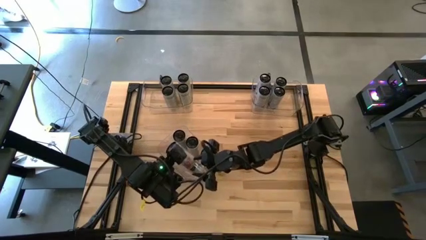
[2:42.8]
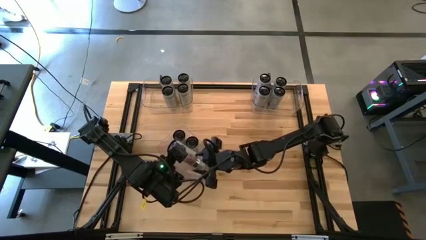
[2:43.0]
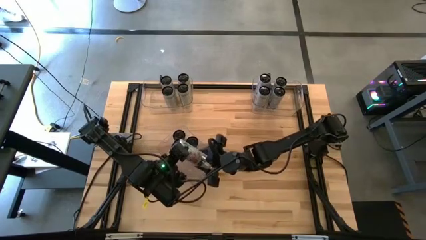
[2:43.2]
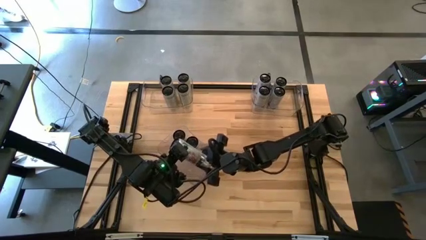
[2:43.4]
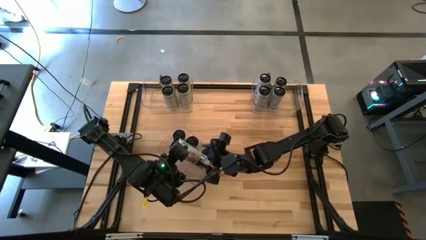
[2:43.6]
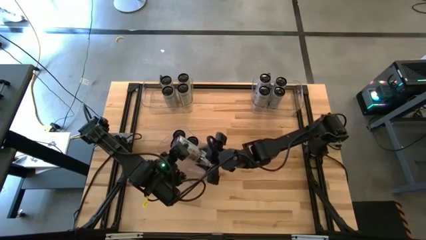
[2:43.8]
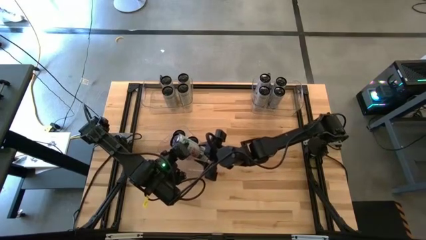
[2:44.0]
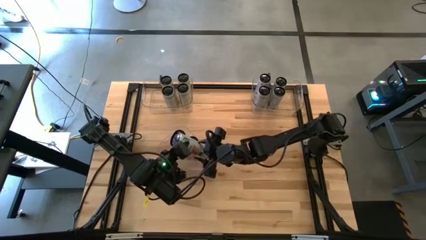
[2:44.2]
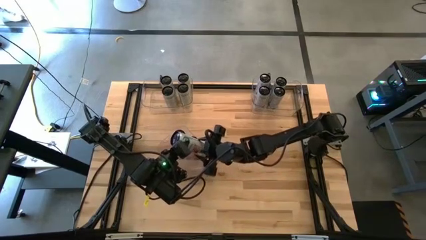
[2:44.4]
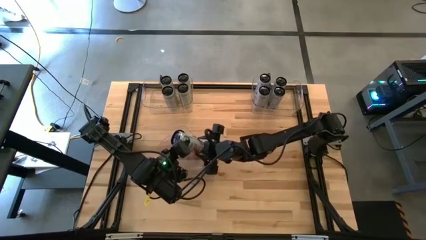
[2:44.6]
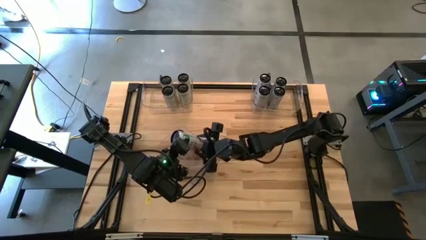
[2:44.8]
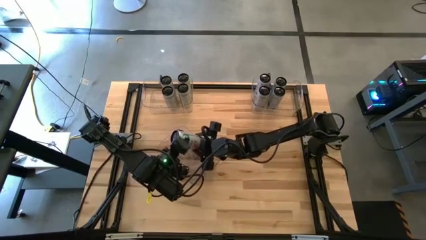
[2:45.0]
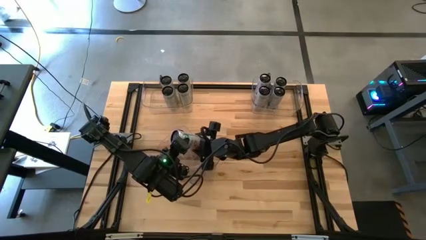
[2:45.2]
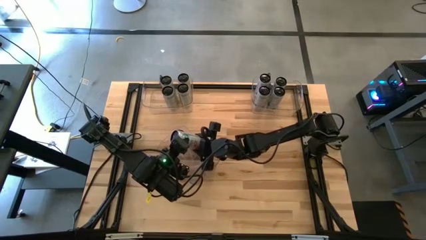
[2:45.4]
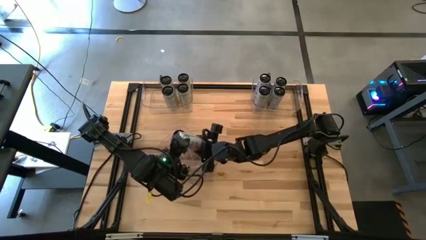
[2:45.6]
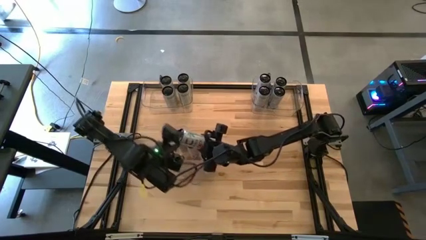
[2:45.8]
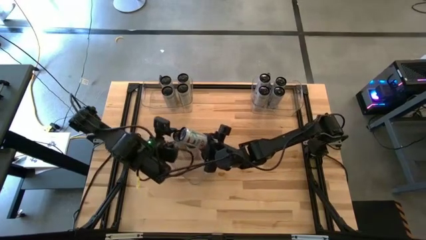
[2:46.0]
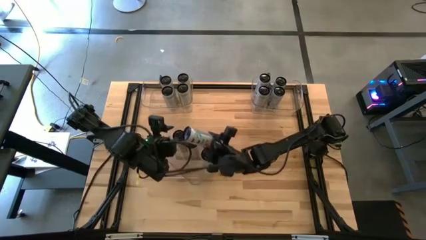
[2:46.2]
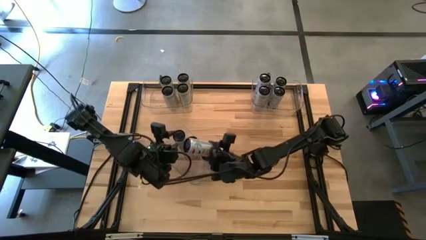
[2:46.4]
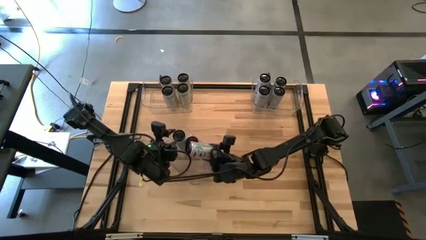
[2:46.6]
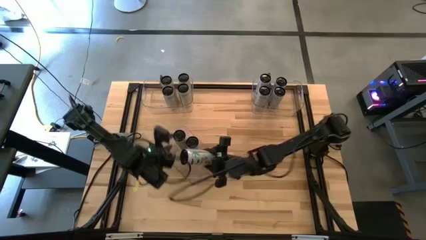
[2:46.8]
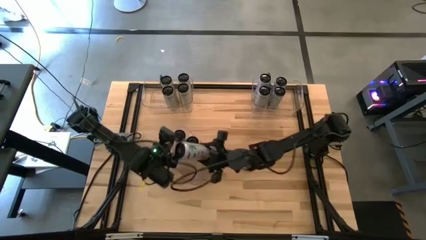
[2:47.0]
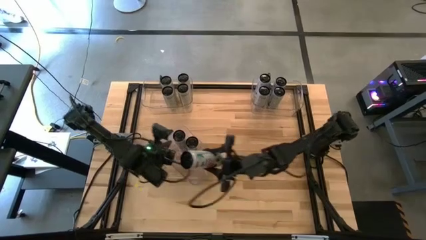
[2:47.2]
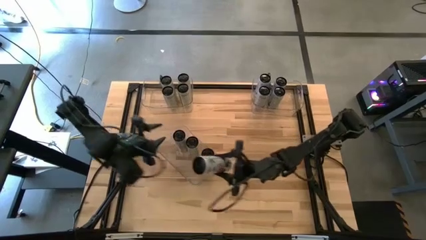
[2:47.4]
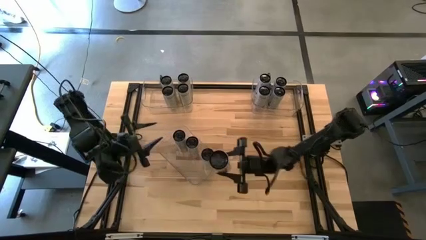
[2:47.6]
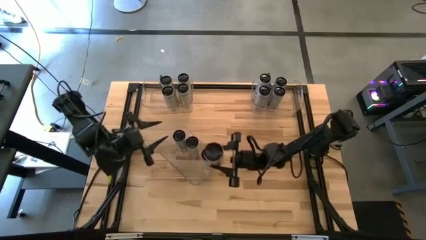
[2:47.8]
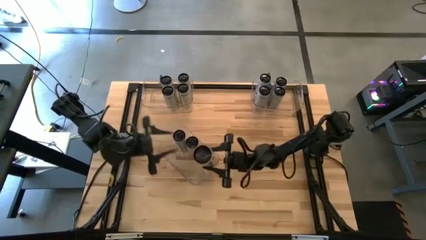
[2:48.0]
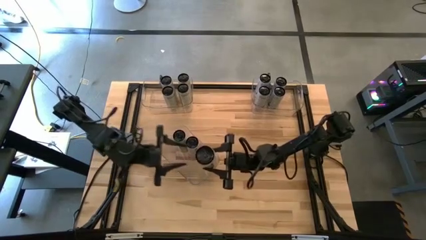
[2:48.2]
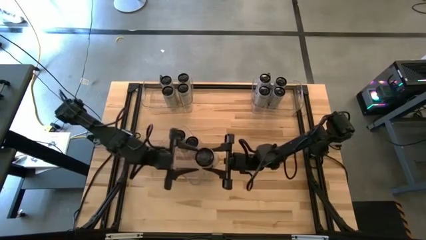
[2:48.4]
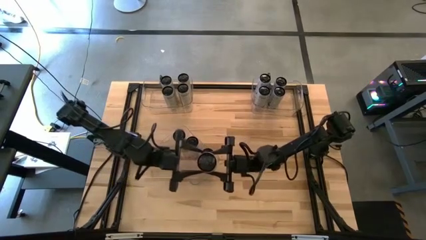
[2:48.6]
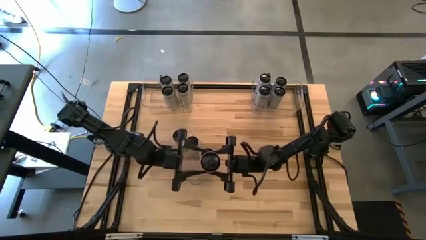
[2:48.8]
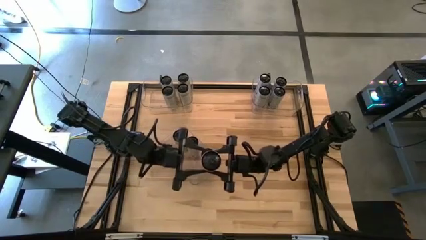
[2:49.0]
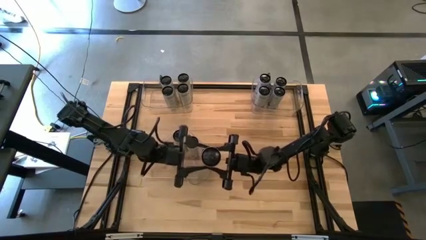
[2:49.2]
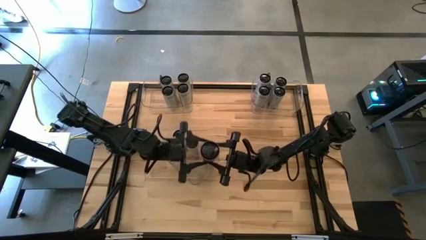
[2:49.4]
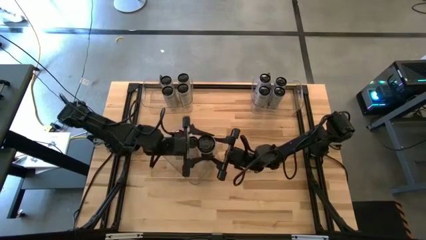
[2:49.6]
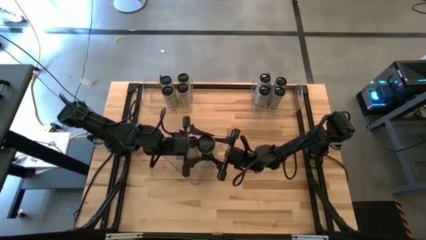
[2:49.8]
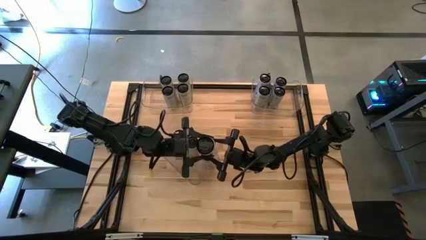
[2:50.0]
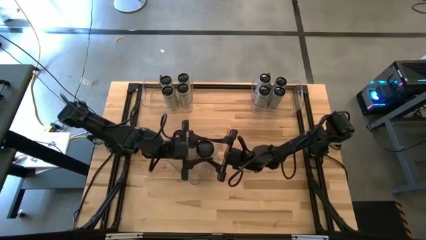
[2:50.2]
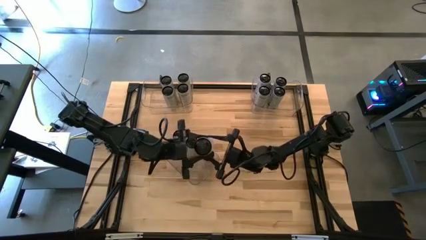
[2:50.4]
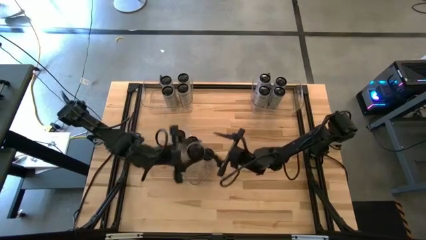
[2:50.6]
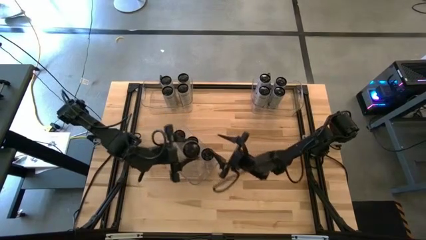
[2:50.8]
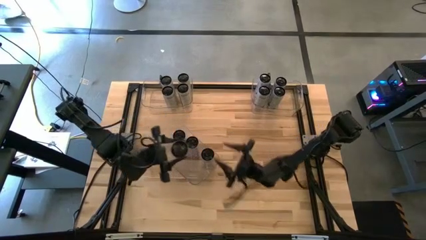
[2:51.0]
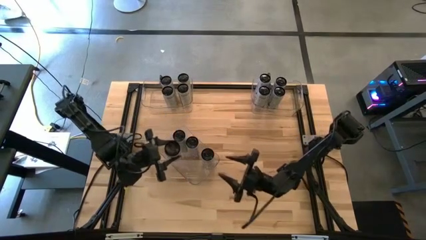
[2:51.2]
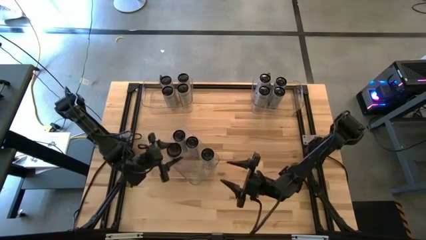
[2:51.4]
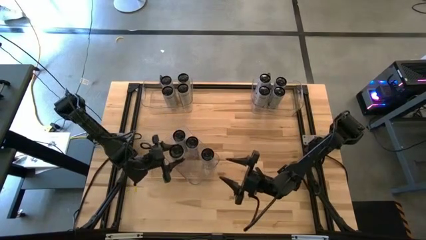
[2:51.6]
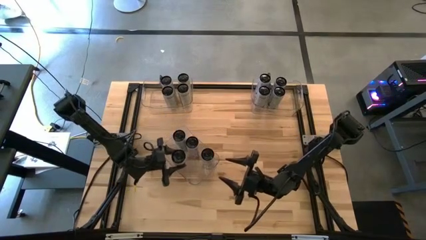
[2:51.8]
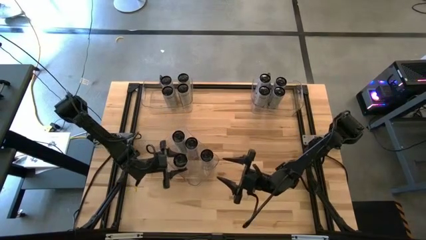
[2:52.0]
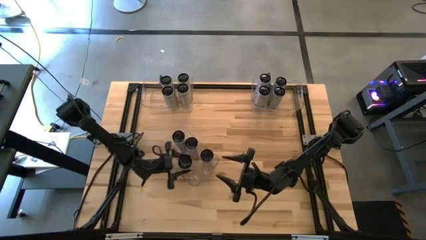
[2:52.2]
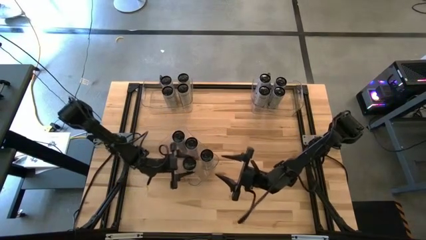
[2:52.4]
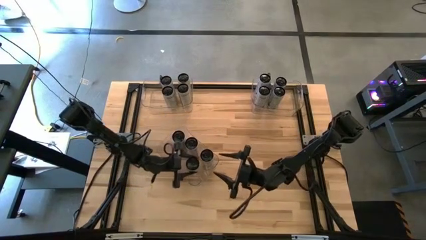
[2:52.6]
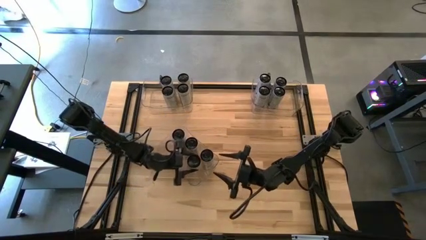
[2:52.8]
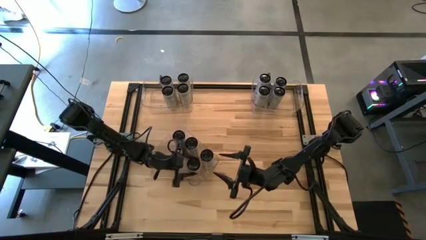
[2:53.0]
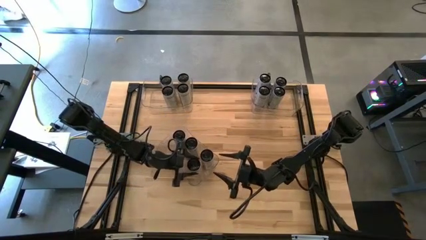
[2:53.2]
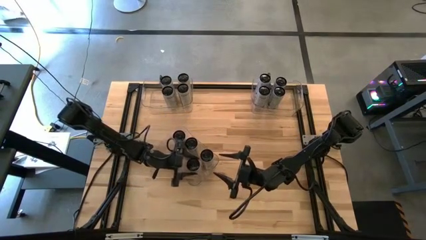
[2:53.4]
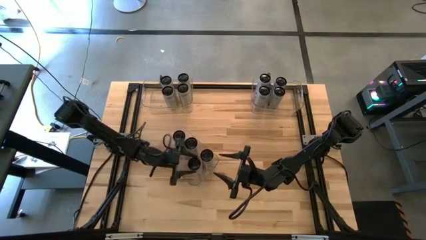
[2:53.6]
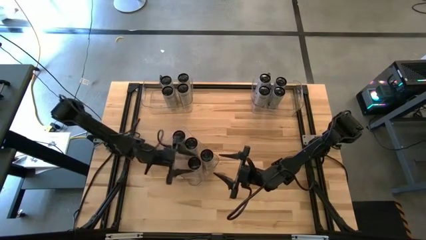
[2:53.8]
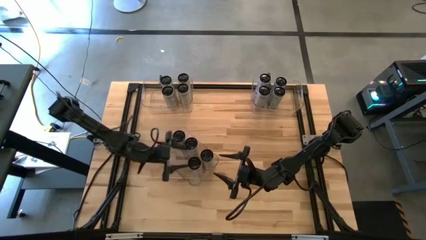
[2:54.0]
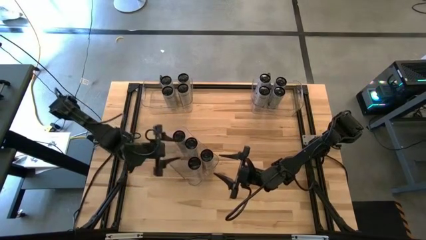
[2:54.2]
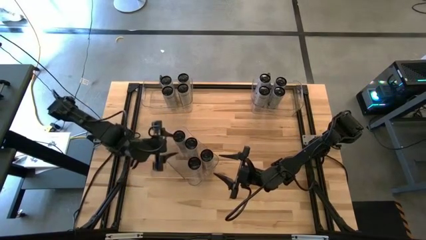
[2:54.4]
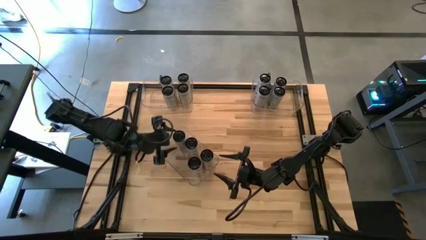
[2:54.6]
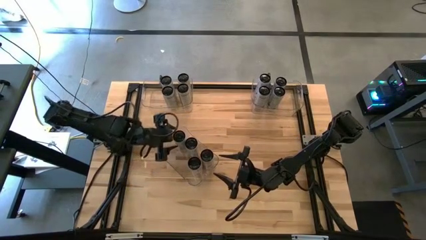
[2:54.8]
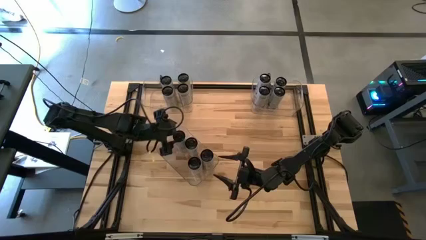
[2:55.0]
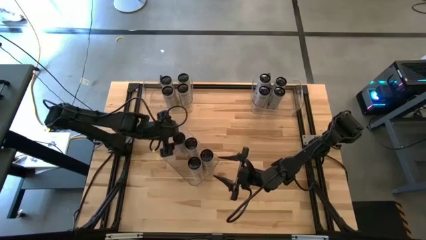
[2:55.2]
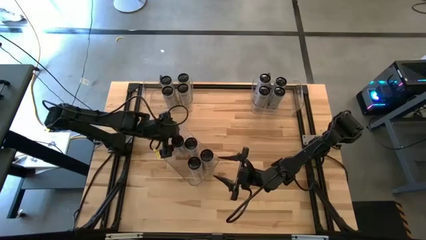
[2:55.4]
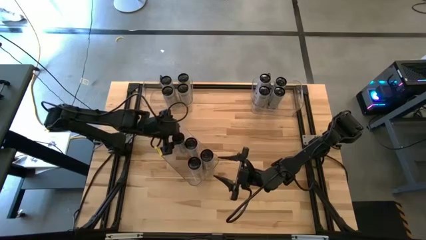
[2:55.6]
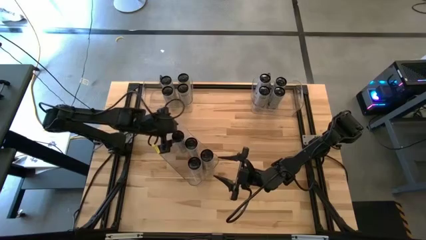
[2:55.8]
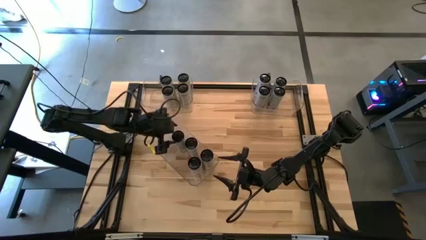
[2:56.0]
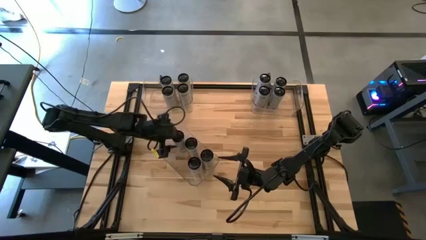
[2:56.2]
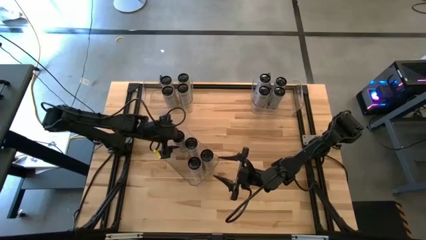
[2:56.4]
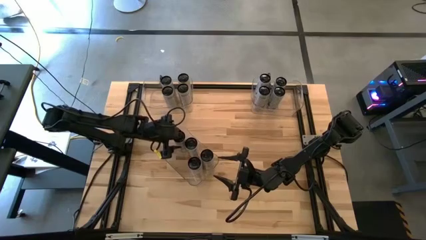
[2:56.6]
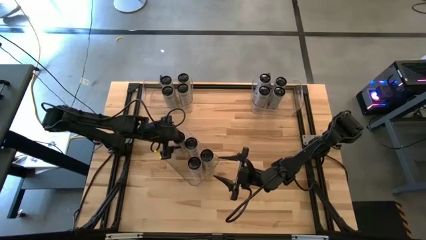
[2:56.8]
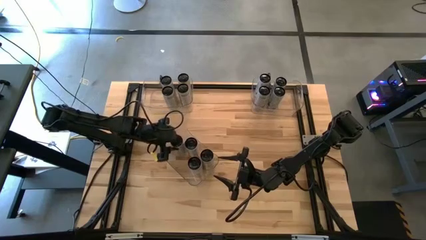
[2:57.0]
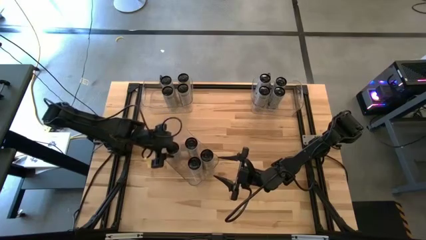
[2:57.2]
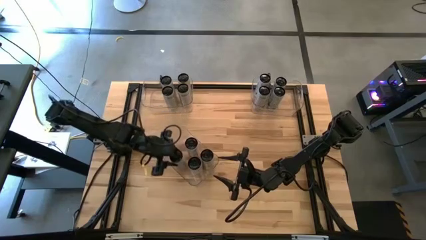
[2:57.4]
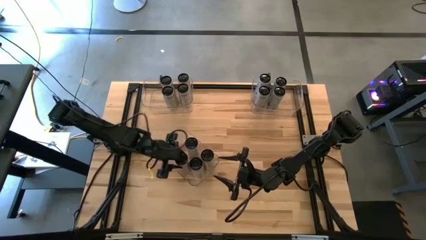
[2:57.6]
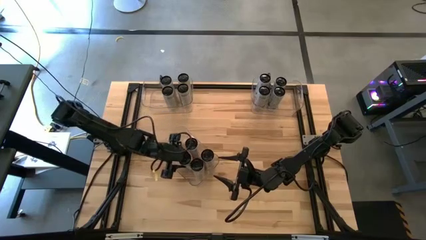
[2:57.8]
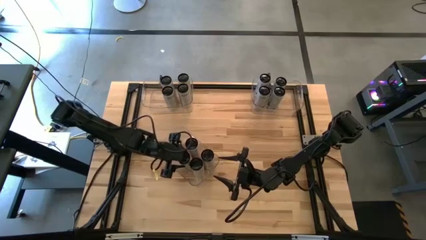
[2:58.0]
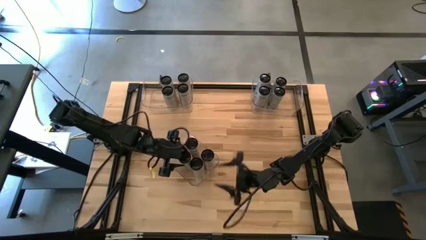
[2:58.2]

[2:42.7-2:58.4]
Task: Sort soda cans
Adjust all the white-pink soda cans into the center transparent bin

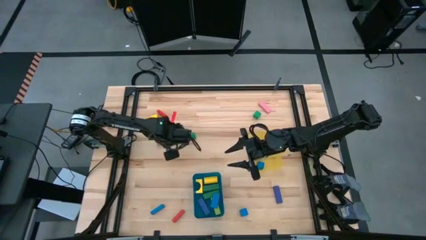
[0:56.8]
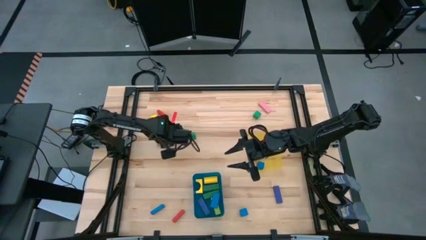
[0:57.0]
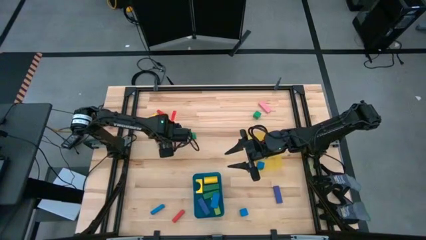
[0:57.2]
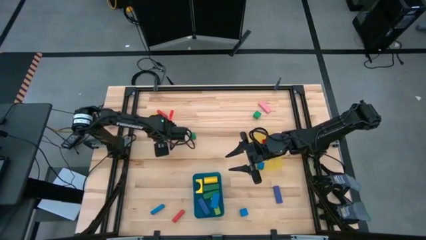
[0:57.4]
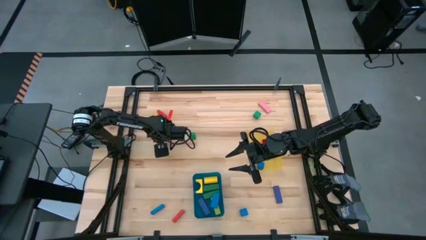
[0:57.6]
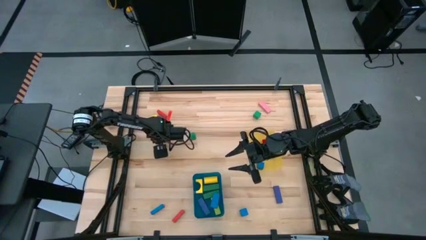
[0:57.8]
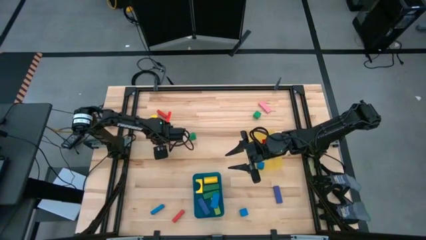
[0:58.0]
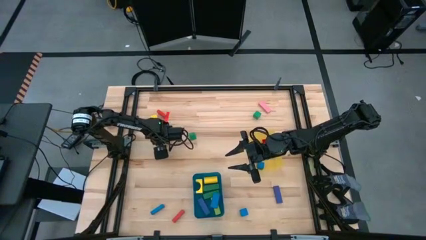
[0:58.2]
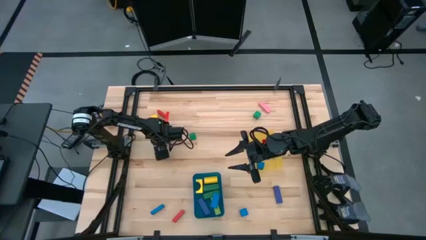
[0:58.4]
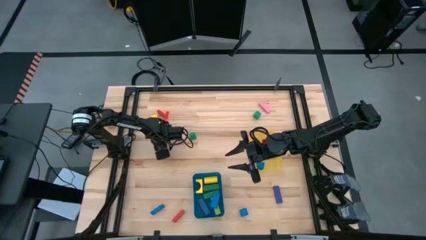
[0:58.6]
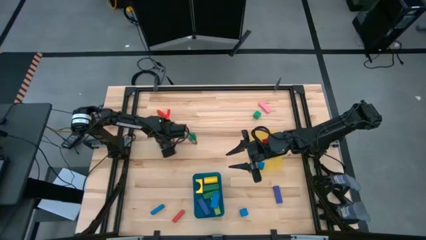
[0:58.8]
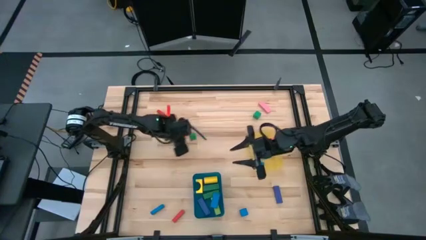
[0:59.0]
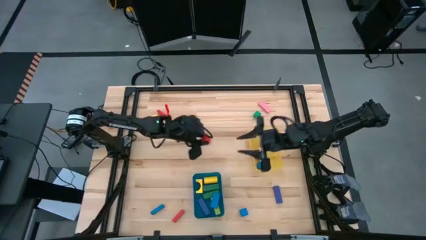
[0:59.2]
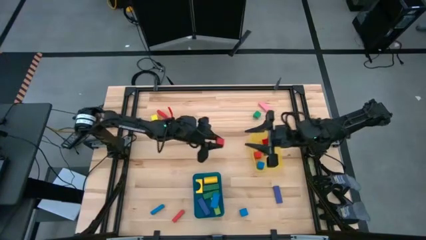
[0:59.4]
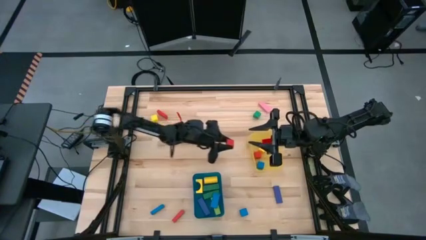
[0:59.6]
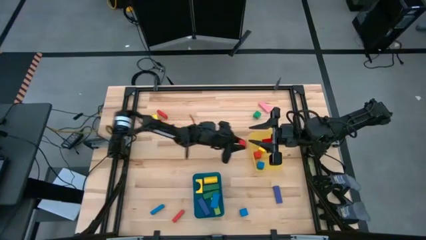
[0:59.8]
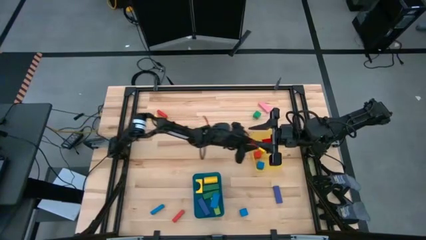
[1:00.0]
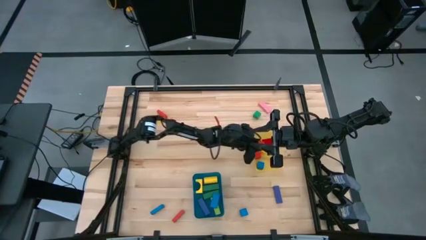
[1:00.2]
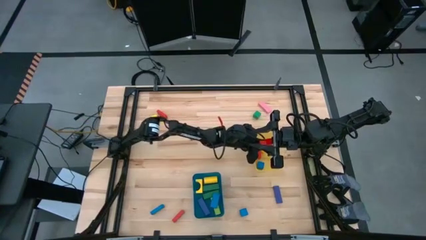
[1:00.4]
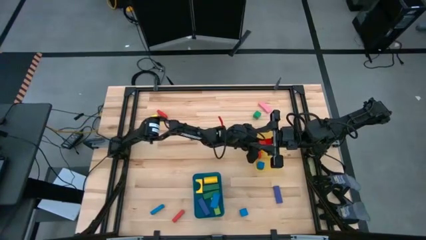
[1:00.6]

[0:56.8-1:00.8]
Task: Sort blocks by size
Put the small red block into the yellow bin
